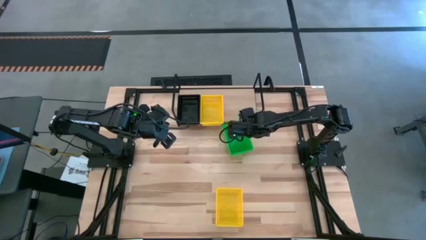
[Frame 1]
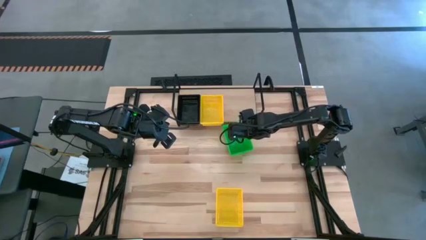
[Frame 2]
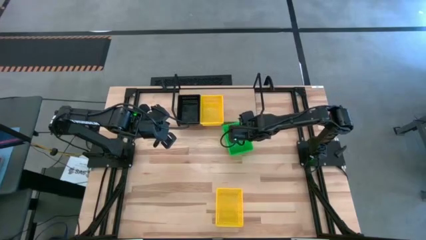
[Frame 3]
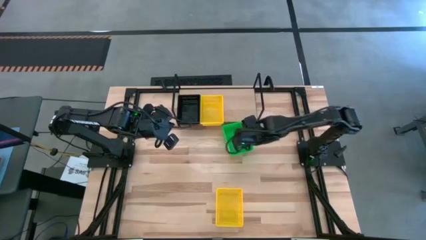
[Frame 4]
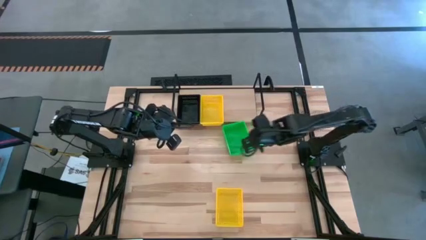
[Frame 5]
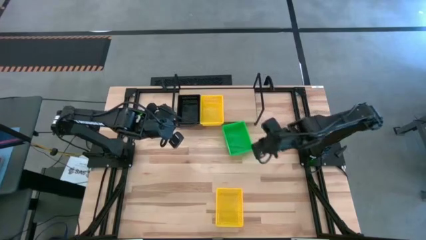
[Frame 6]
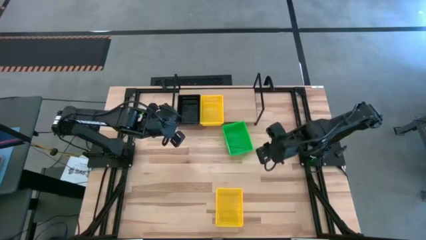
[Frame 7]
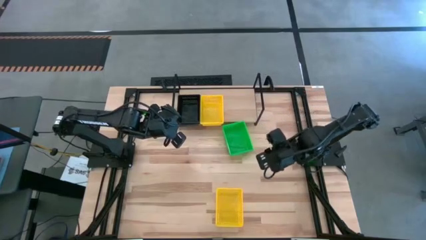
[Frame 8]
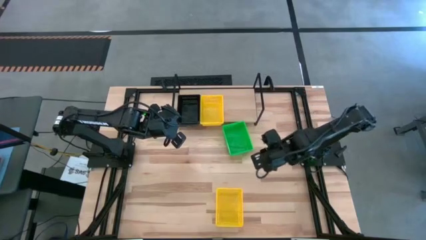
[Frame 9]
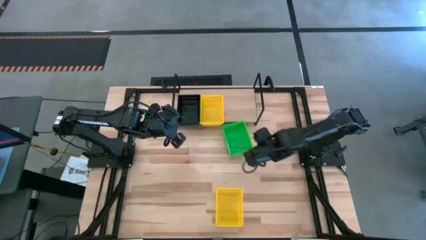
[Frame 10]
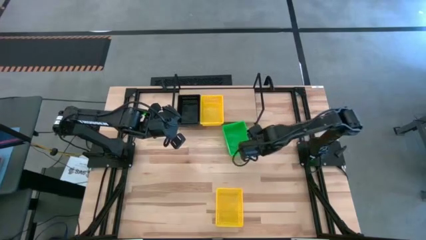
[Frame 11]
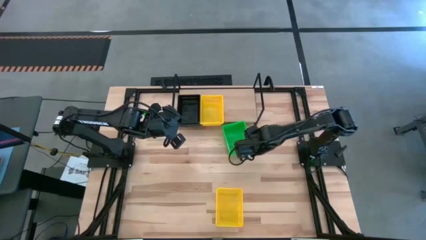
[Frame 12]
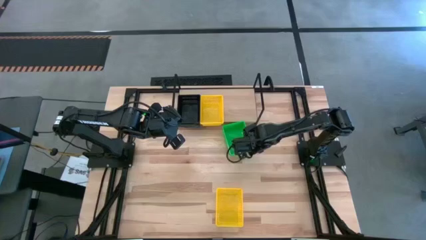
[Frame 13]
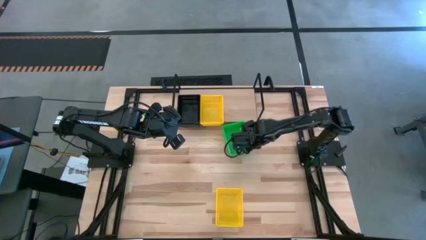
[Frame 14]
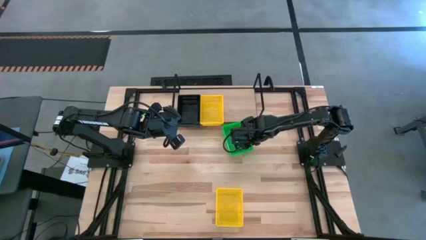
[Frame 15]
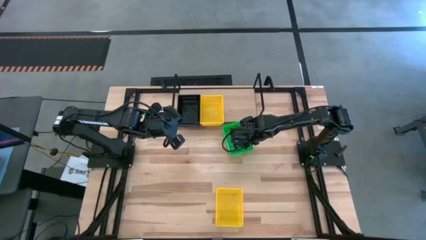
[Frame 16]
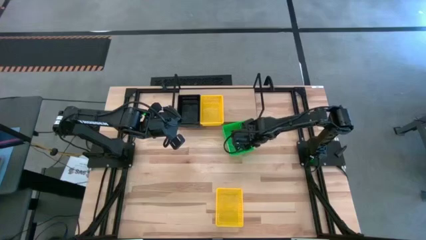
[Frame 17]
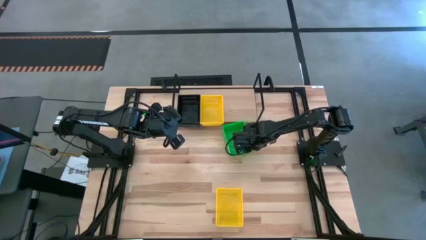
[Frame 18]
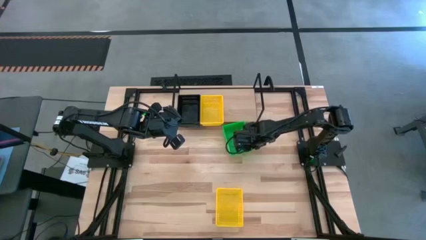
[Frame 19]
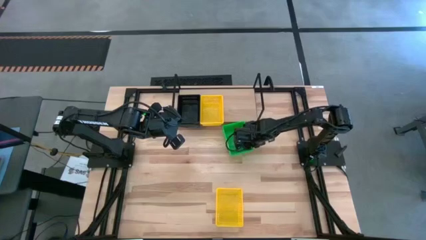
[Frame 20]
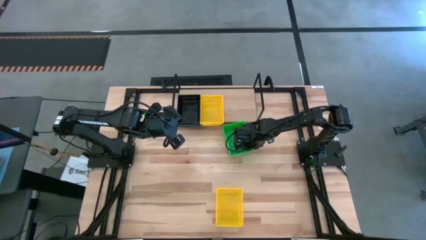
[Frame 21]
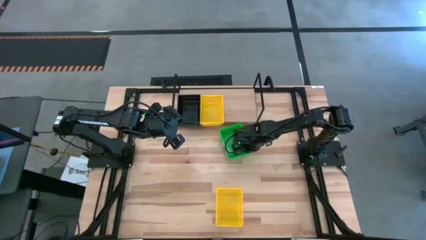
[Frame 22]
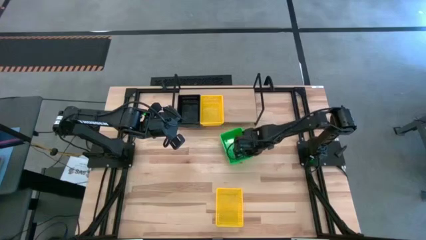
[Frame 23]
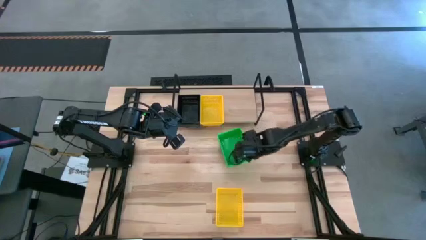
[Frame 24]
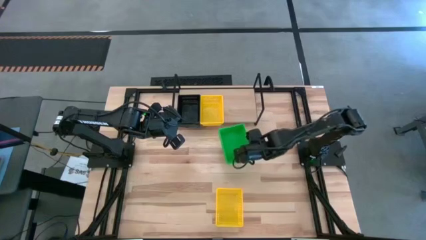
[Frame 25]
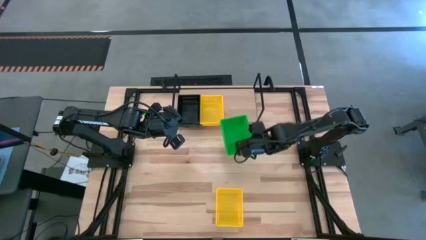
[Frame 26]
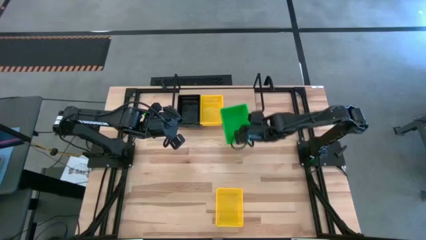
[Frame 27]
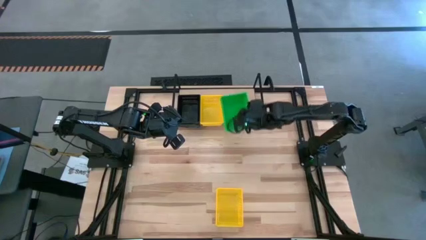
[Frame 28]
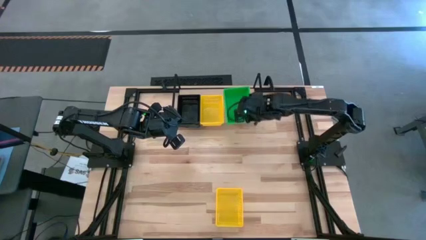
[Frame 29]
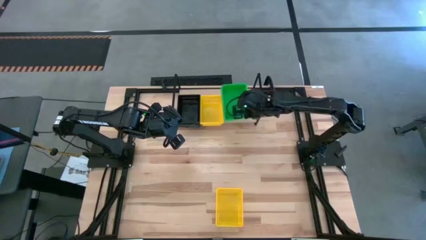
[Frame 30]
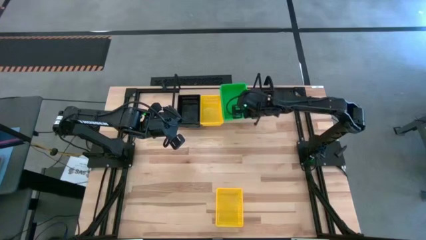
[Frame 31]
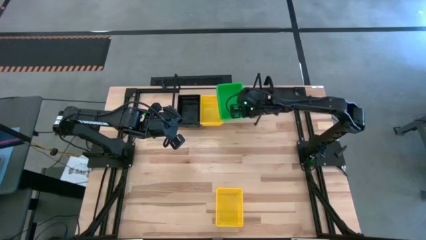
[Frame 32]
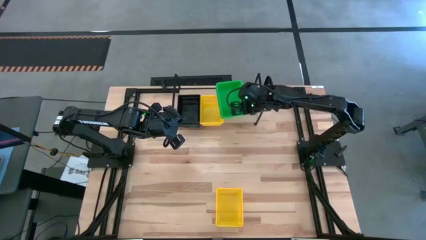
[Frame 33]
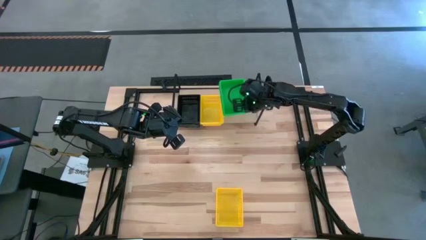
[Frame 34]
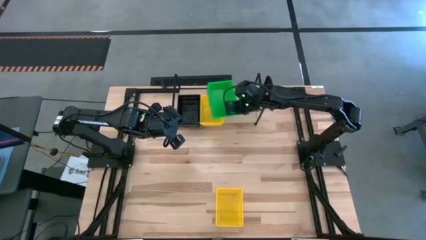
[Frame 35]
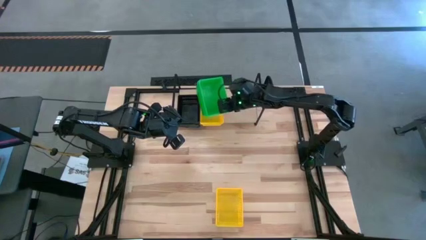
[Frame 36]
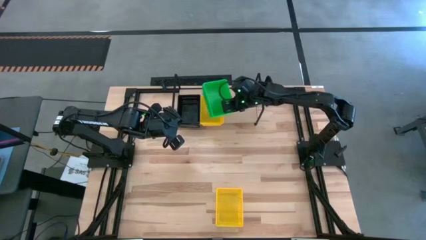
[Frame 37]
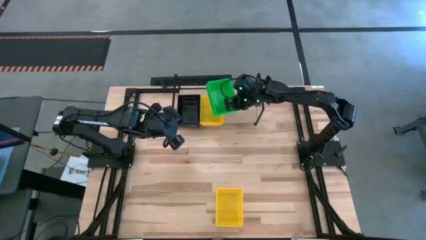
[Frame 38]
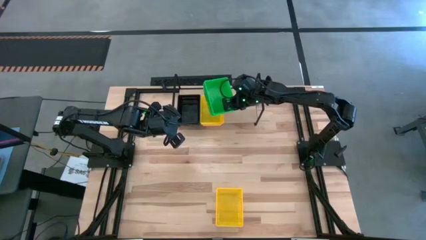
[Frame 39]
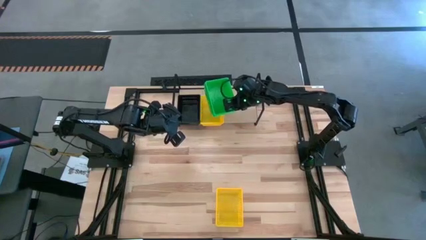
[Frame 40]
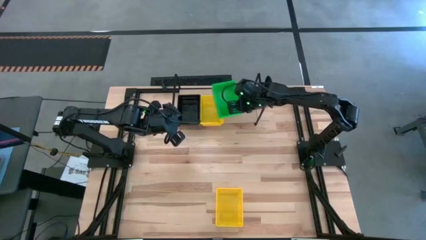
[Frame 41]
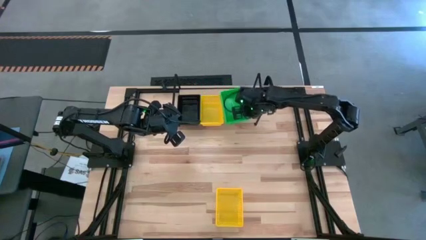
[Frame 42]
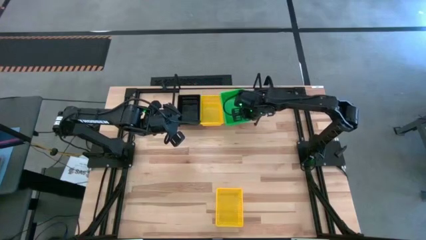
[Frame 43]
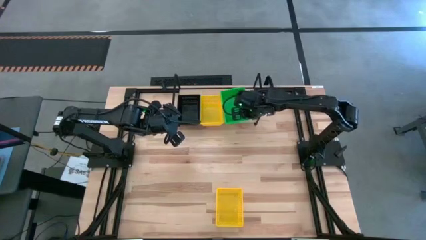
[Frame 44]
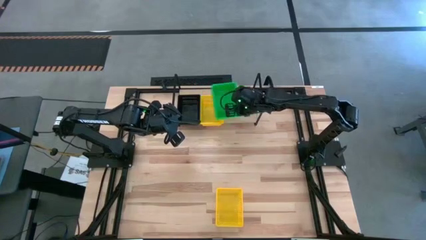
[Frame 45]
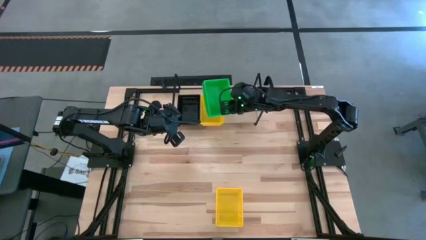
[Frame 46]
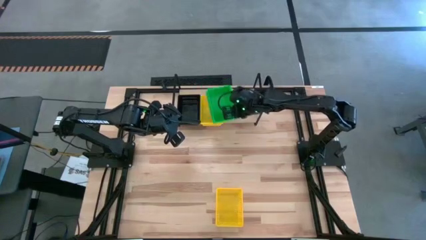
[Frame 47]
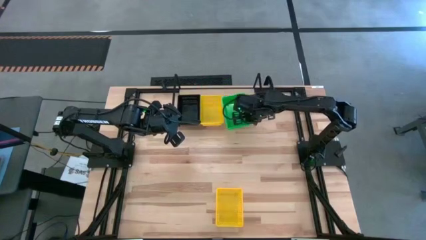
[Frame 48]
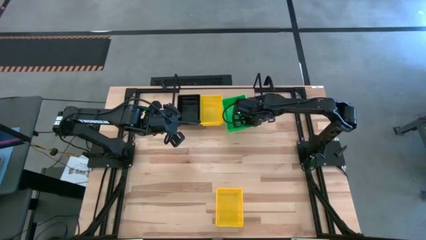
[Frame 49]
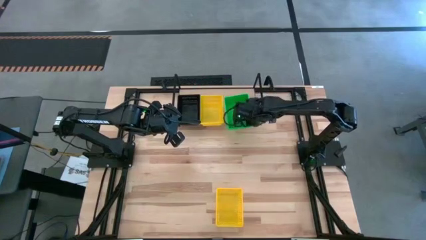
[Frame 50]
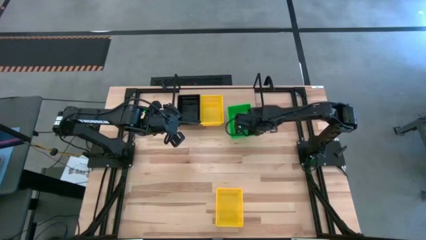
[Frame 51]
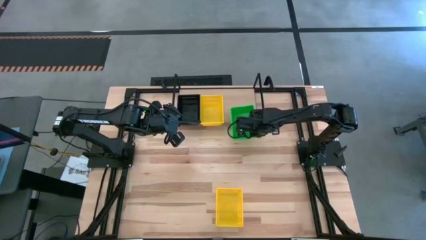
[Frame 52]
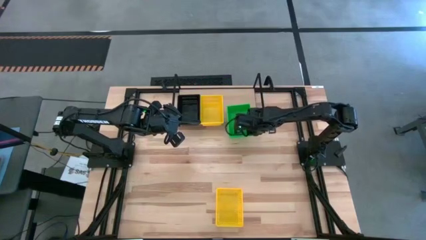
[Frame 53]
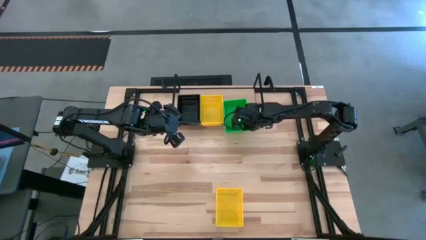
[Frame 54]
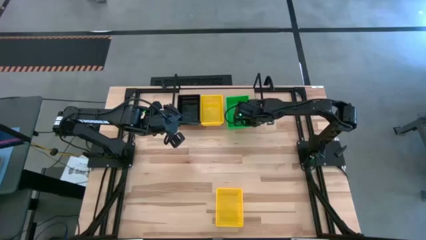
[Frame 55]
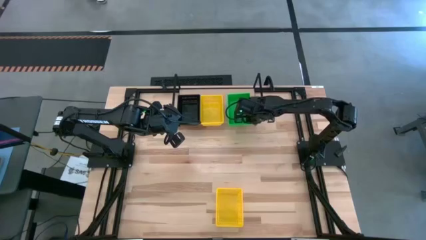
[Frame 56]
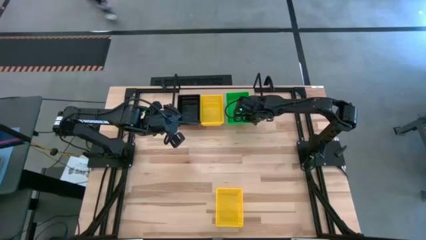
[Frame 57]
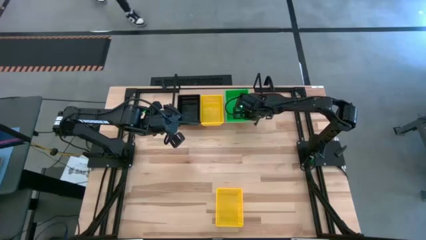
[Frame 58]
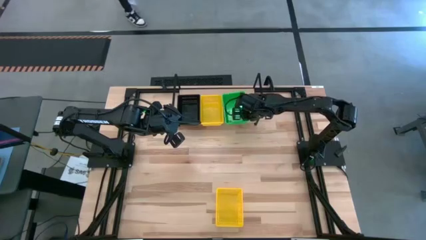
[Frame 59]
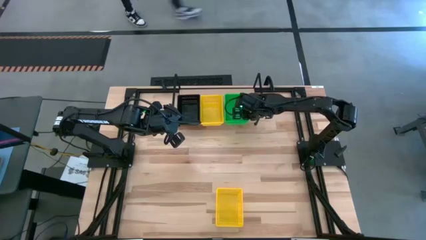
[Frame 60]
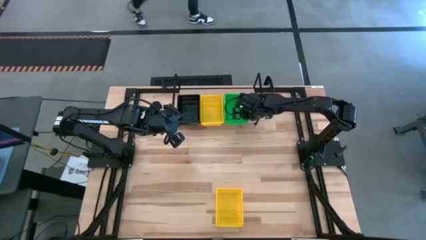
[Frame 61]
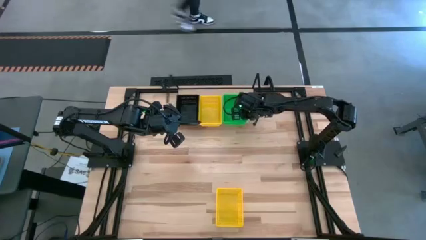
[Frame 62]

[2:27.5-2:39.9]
Task: Stack baskets on shelf by color
Put the stacked green bins on the shelf
